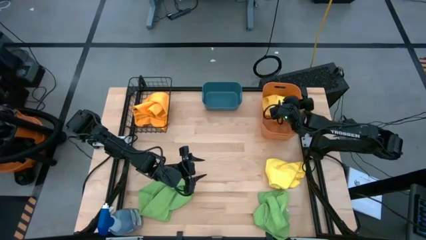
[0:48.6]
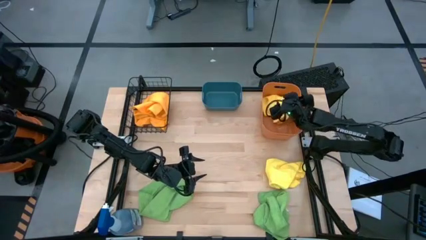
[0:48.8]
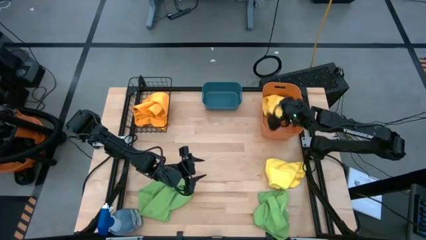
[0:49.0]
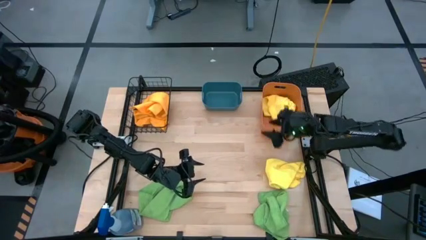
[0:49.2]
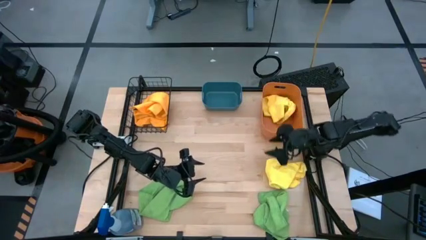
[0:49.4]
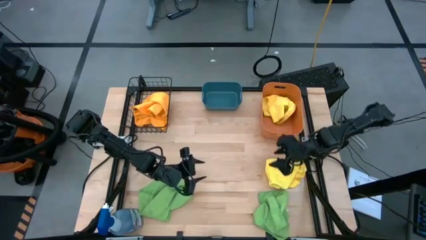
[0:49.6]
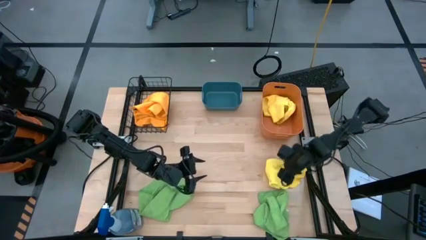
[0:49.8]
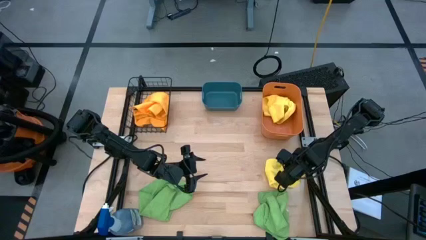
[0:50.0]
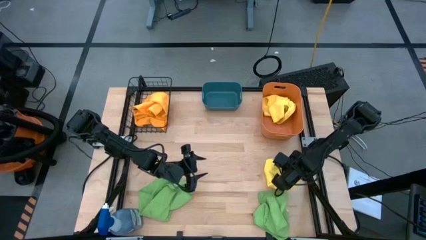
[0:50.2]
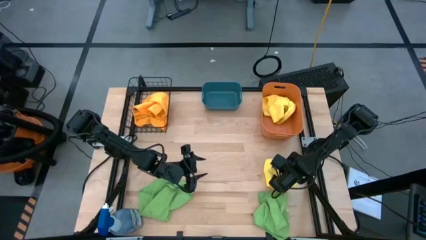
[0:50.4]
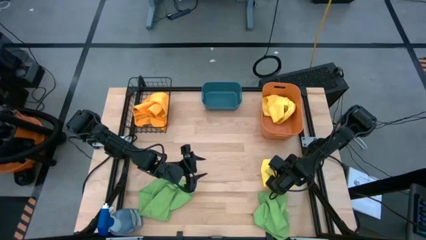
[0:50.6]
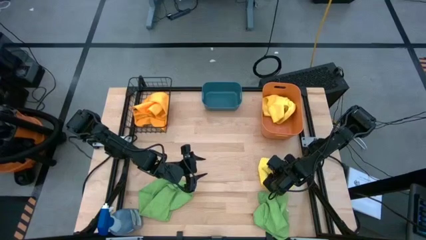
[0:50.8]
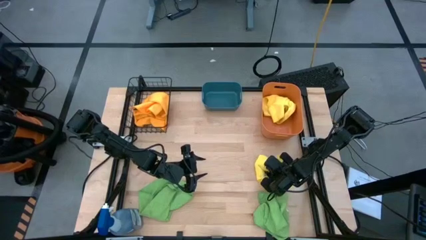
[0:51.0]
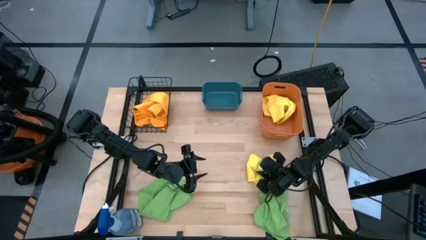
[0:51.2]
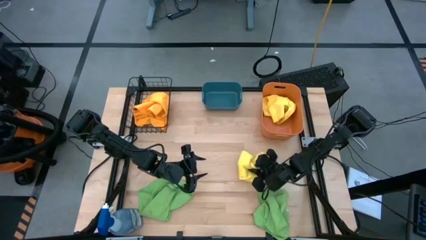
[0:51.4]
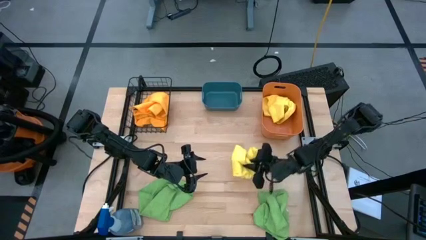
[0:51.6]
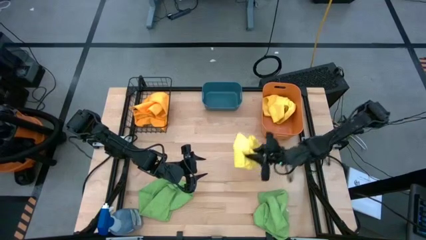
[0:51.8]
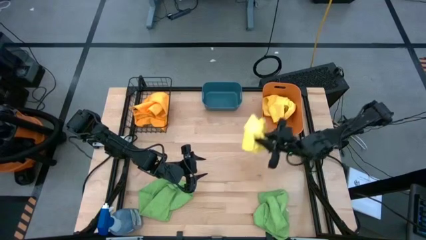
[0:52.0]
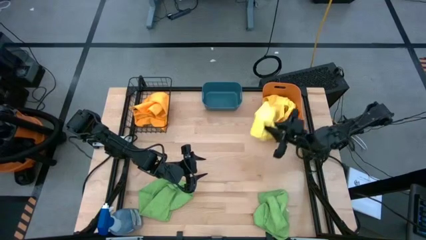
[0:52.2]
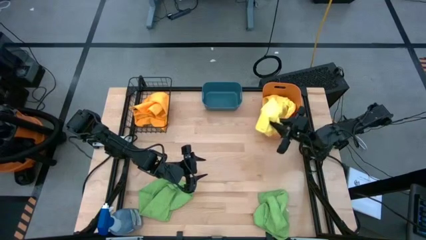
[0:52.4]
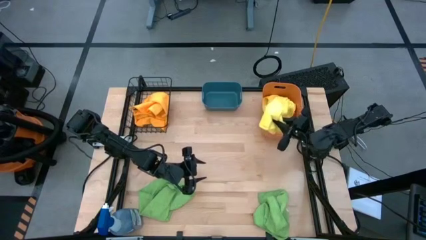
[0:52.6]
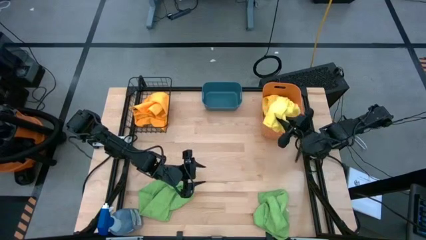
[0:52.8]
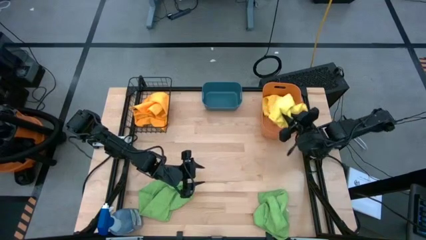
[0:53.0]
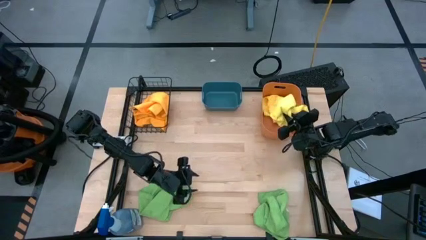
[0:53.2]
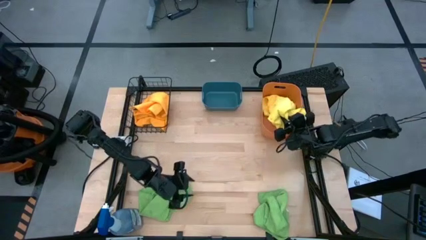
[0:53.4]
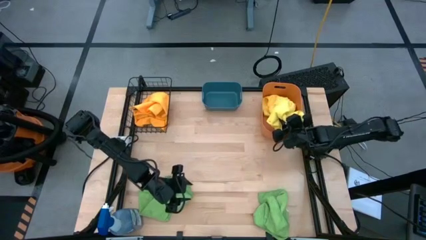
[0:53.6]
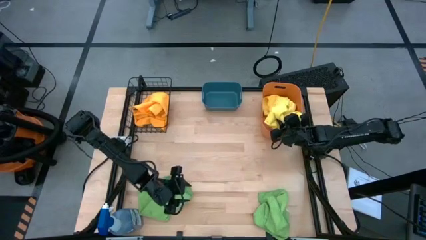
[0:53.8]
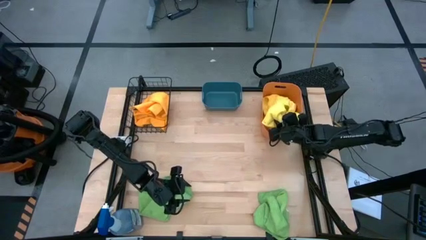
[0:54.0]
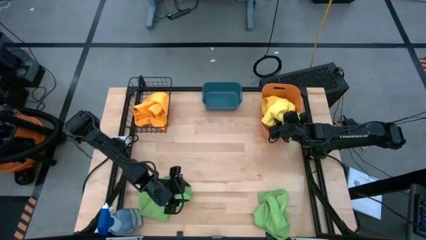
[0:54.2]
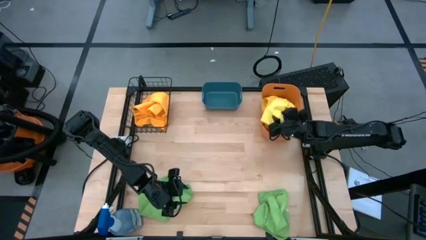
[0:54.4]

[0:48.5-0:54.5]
Task: Sort microfiber towel by color & place in baskets
Put the yellow microfiber cloth into the orange bin

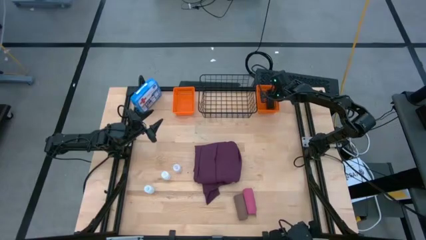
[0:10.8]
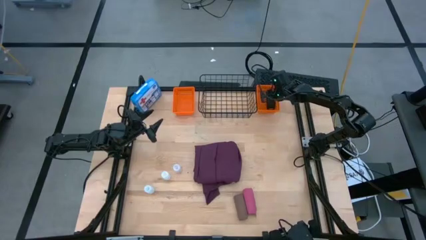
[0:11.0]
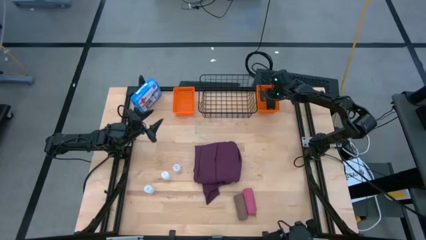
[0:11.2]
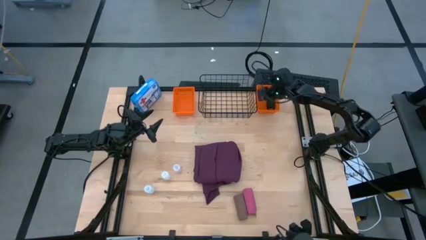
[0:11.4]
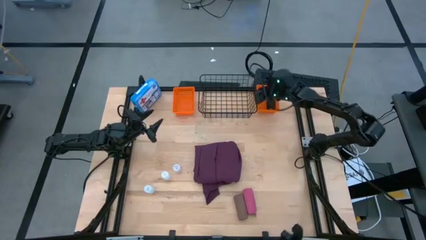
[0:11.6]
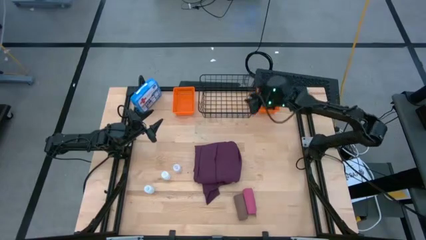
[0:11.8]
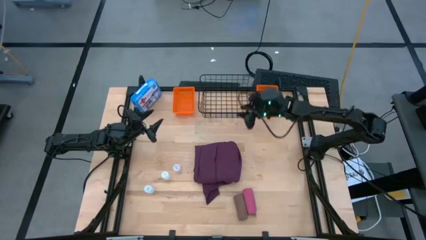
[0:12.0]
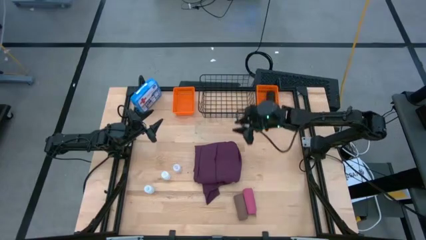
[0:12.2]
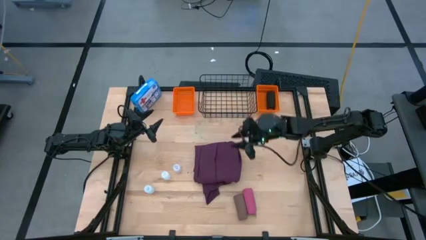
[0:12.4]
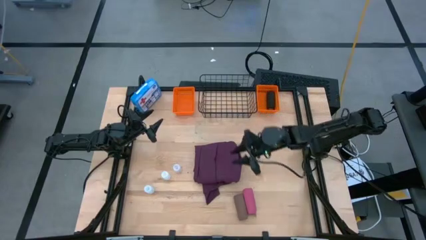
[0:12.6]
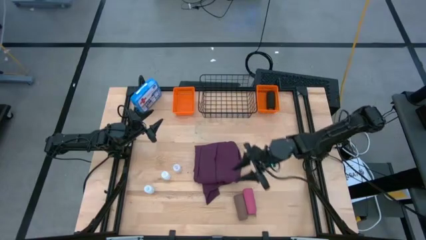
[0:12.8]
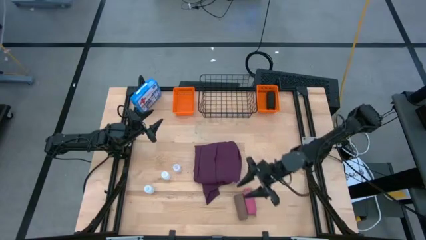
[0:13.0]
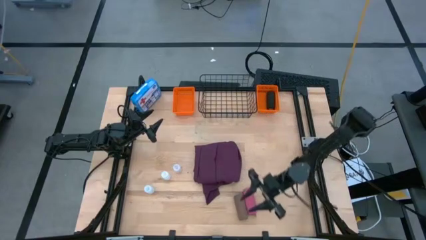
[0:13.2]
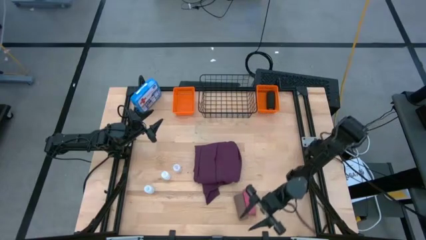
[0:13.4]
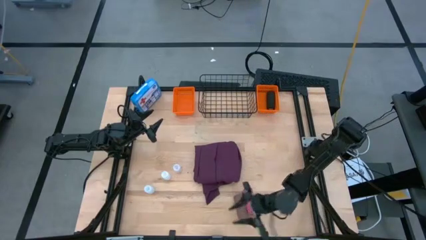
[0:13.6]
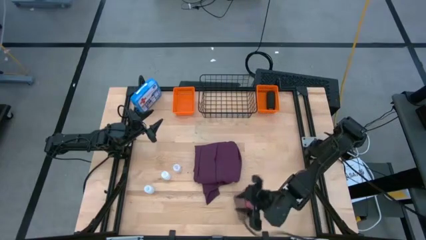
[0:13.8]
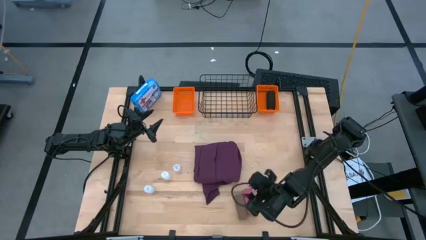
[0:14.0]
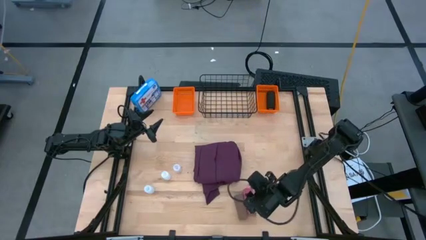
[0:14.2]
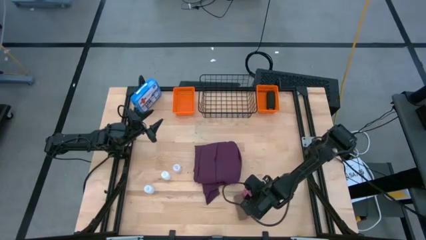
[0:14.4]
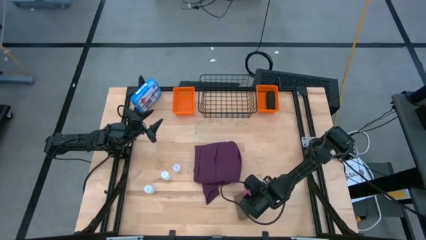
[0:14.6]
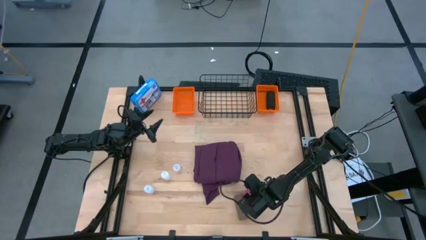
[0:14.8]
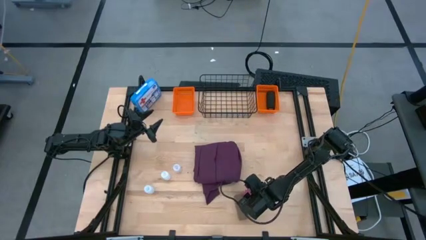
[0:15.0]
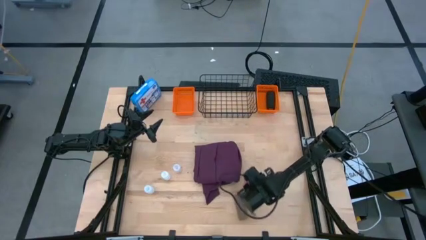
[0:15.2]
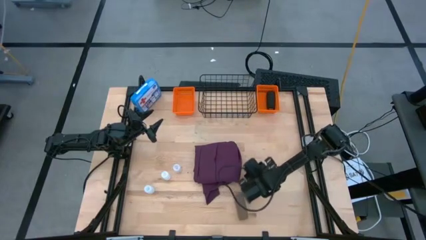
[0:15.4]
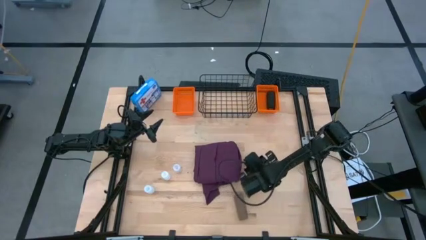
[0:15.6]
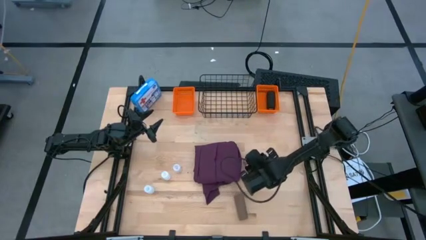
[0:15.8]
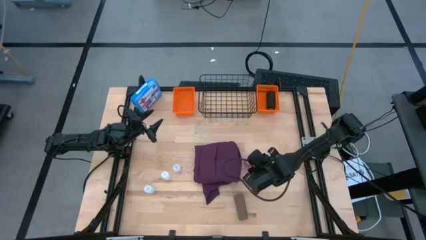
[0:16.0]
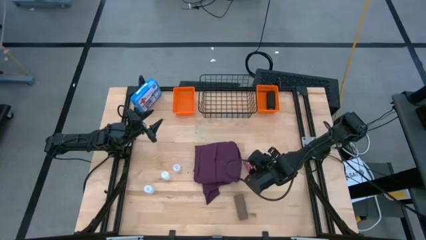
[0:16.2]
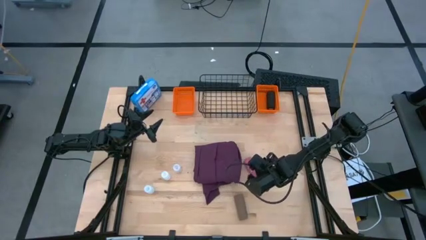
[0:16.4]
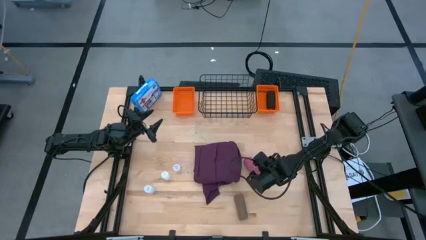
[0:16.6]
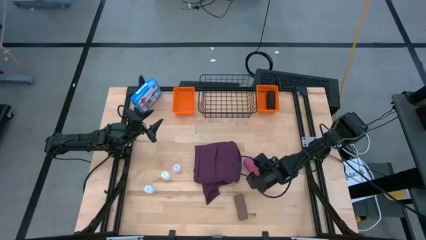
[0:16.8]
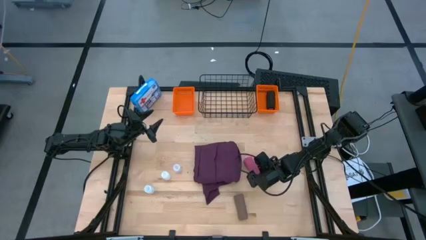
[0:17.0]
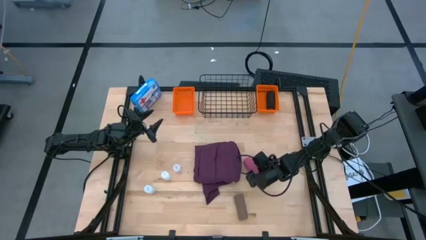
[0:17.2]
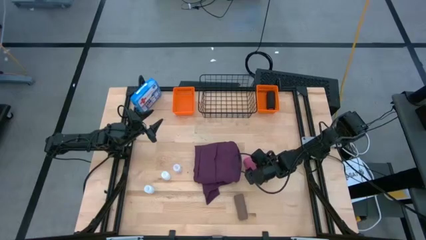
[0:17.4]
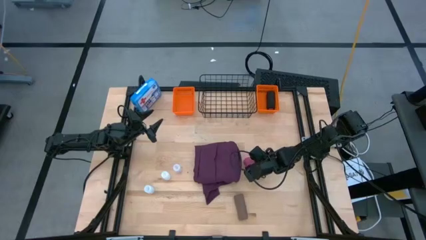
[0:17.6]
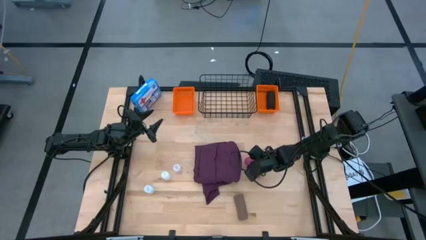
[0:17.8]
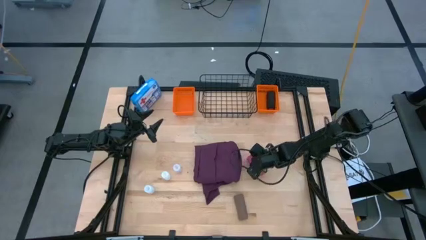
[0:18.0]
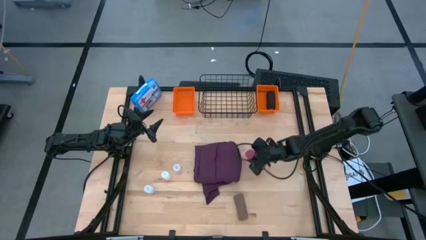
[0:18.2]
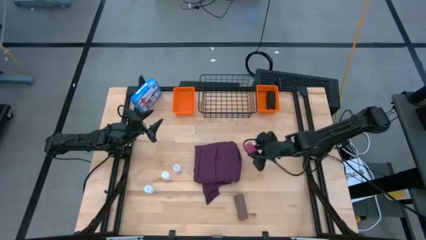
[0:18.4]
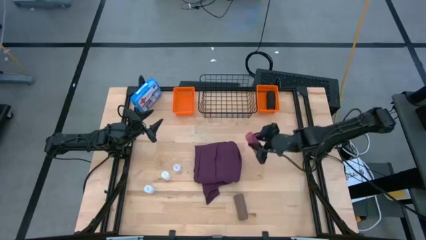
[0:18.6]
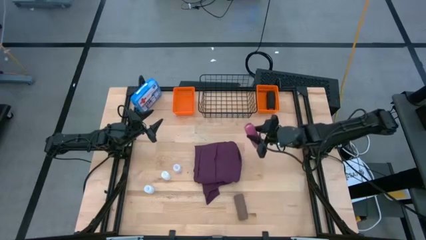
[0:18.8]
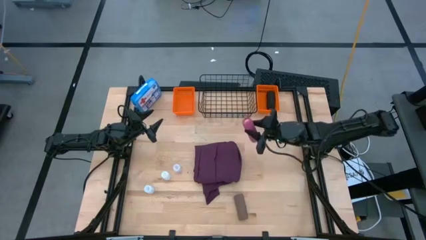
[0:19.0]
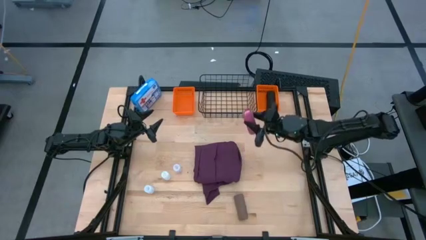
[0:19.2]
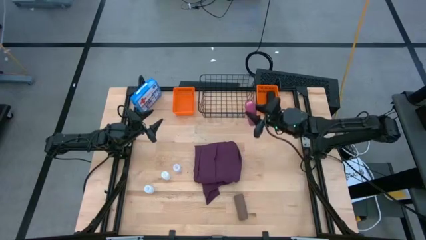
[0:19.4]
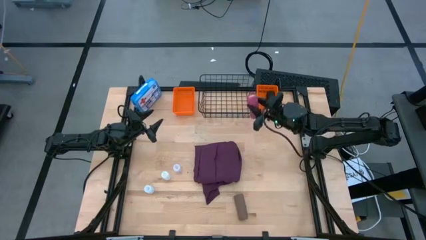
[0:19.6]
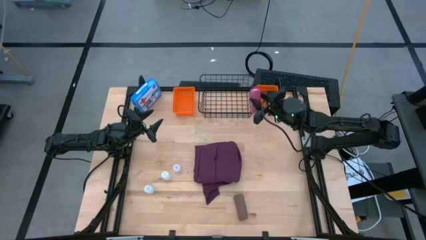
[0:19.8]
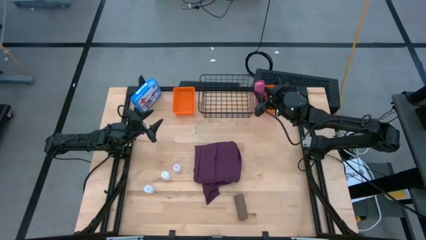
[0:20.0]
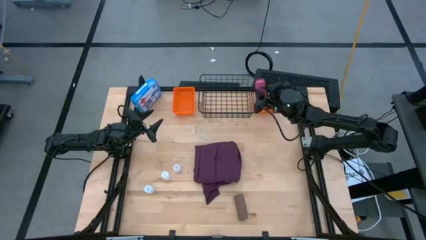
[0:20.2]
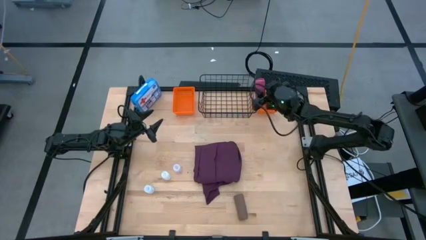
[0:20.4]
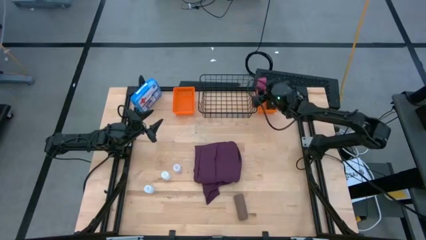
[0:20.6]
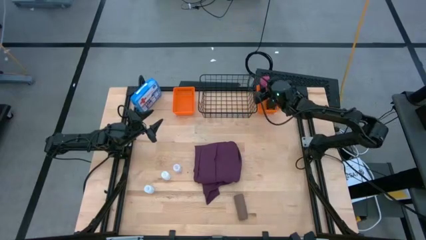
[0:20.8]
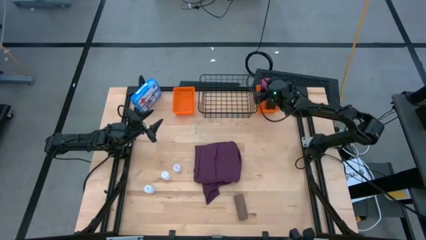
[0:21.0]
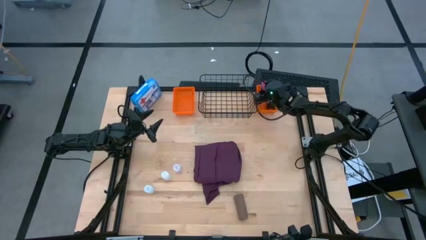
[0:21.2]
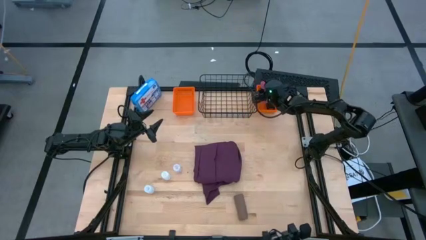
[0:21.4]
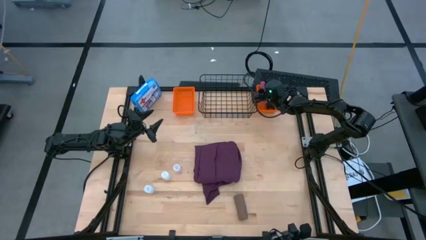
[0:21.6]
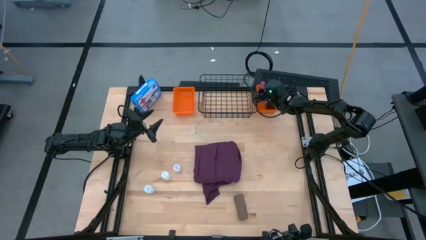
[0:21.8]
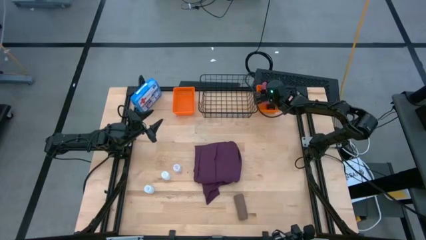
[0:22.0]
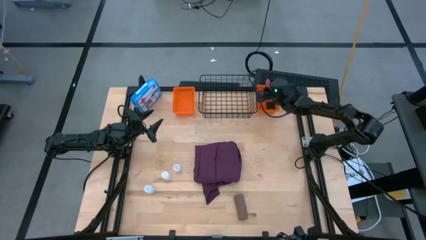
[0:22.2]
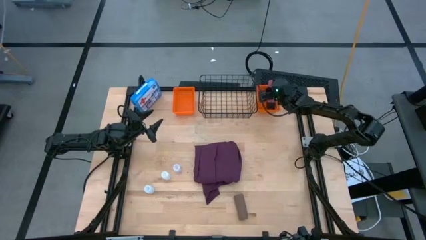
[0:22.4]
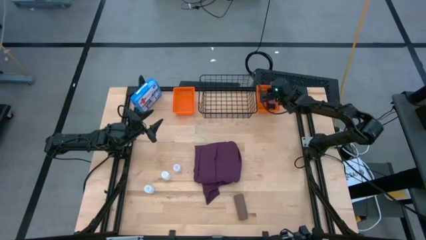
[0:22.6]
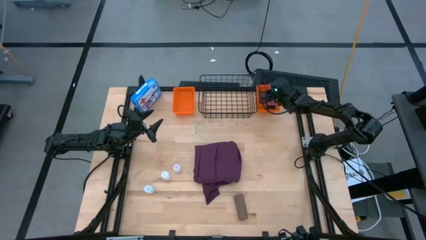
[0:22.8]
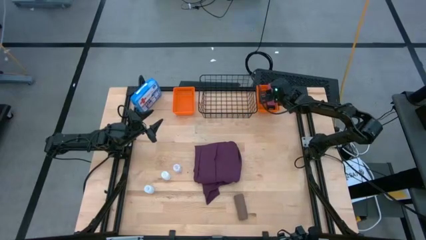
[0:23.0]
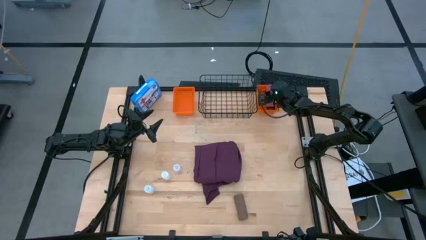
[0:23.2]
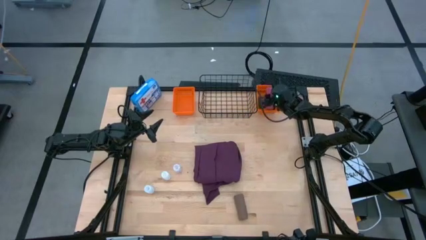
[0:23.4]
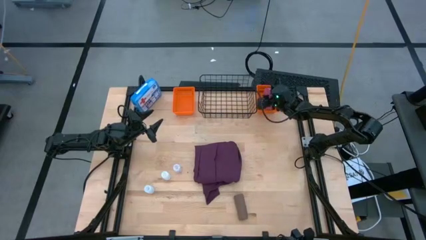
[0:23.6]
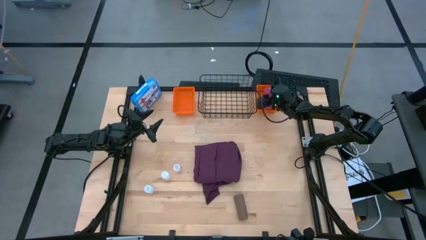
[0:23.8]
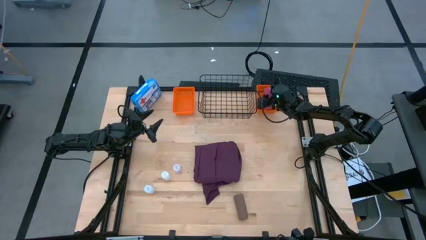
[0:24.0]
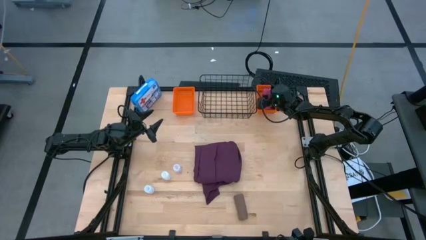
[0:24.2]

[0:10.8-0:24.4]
Task: Pick & place medical supplies in basket/bin
Put the pink bandage into the right orange bin
